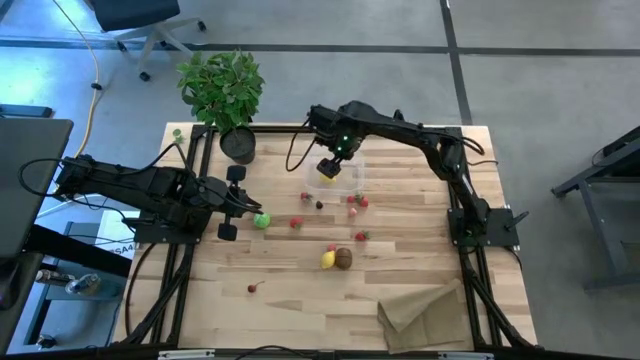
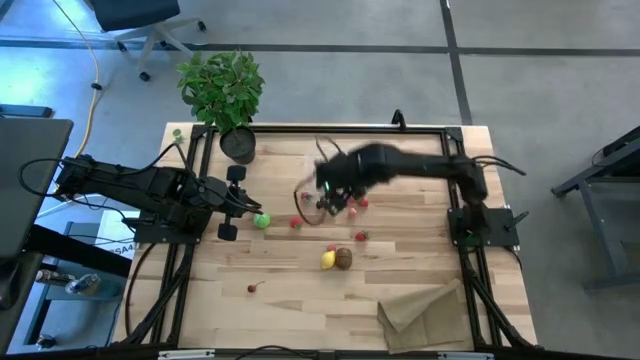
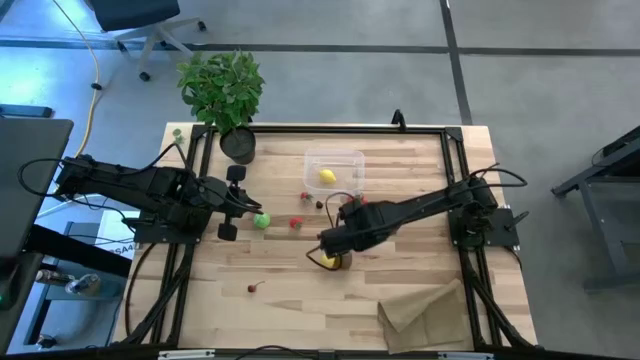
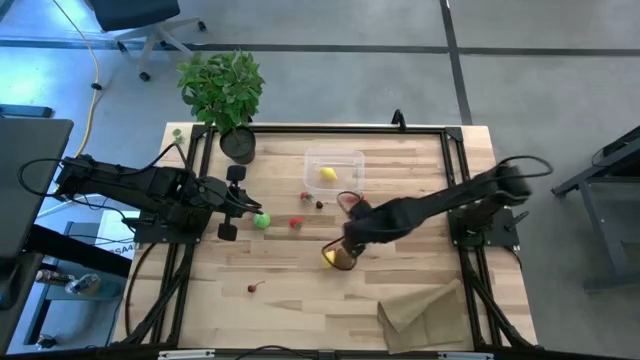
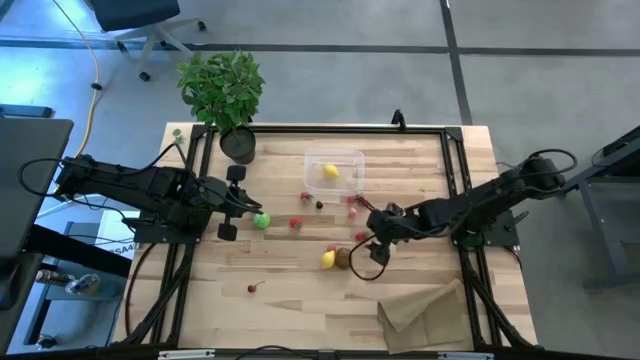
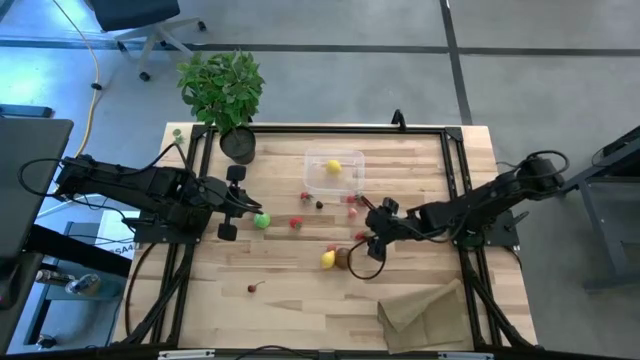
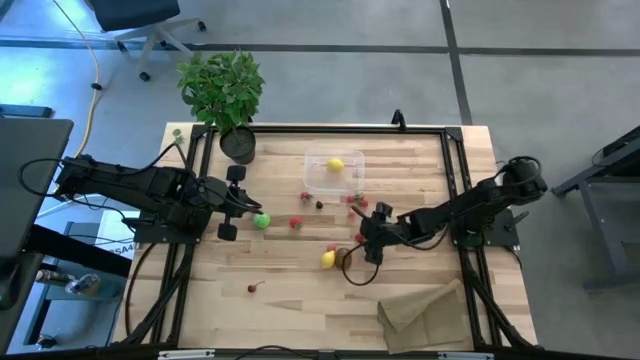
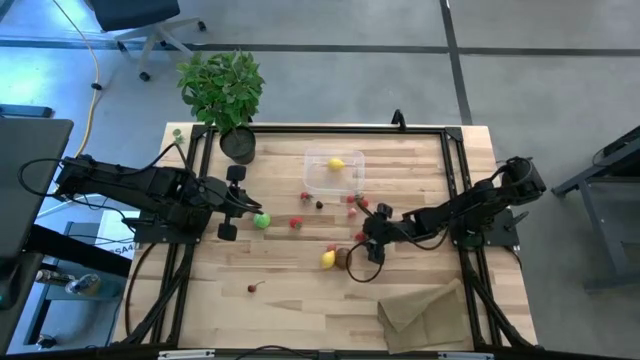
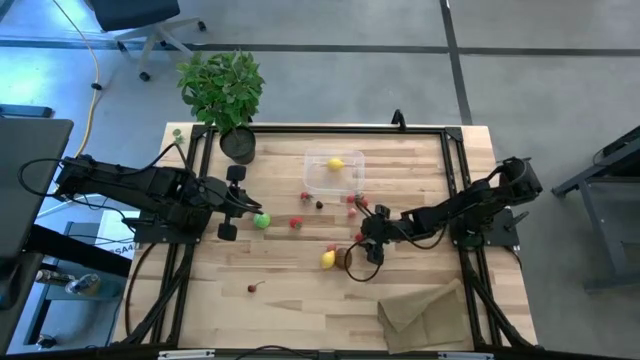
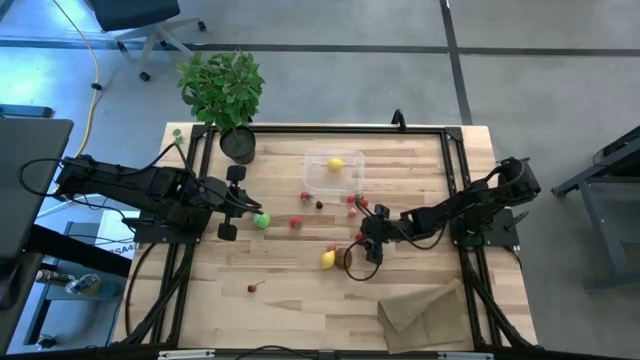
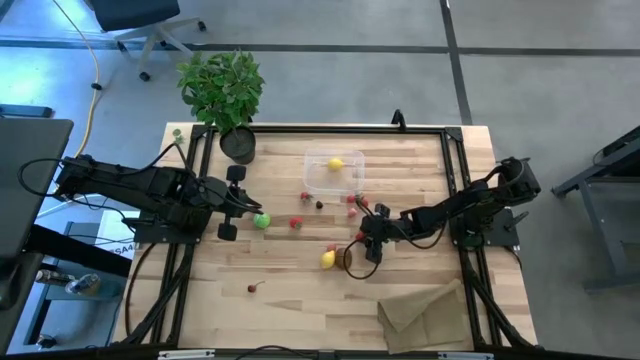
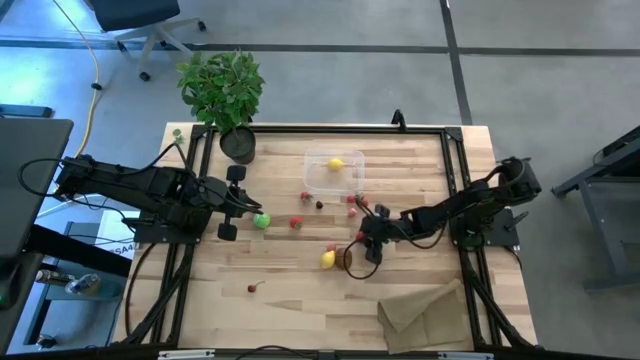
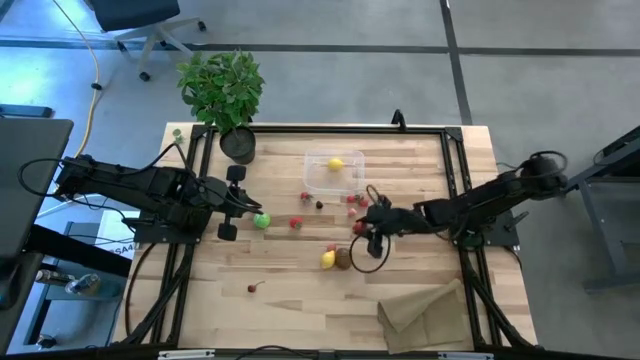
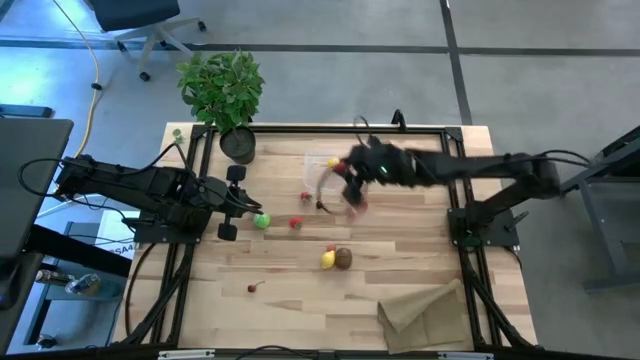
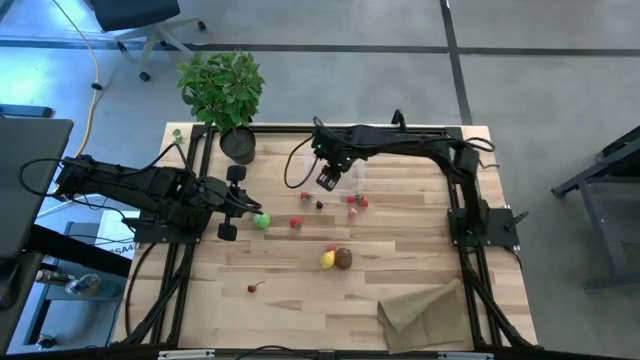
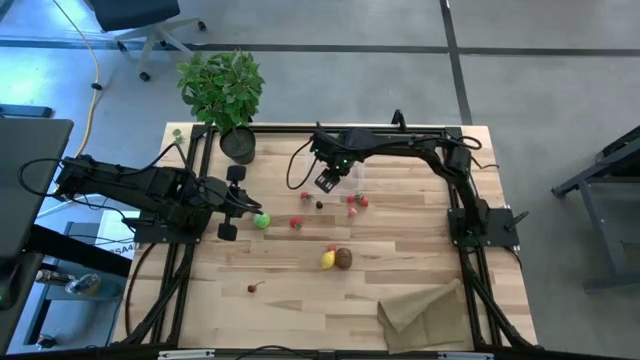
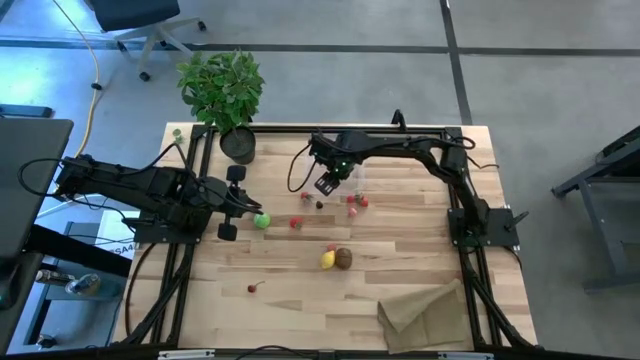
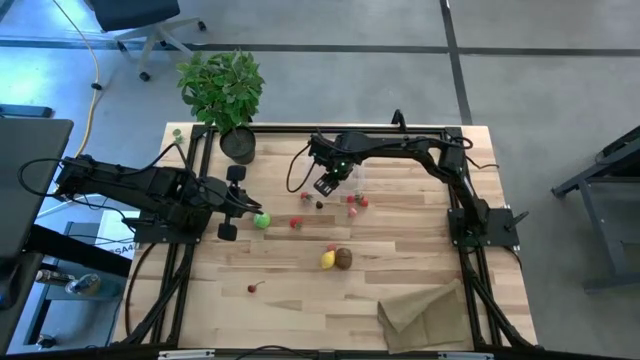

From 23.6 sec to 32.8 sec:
Task: Pick and placing Produce into tupperware
Put the bottom right strawberry into the transparent bin

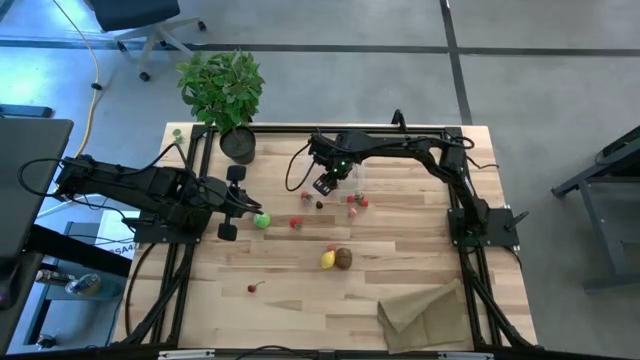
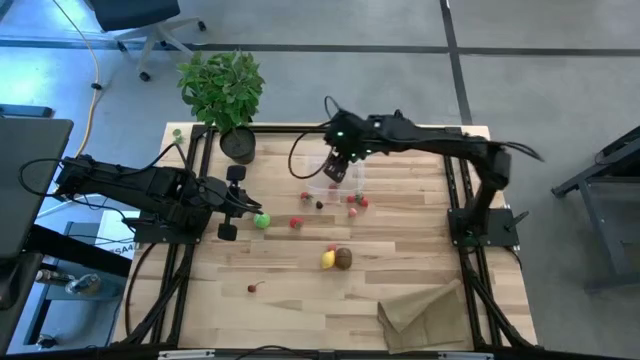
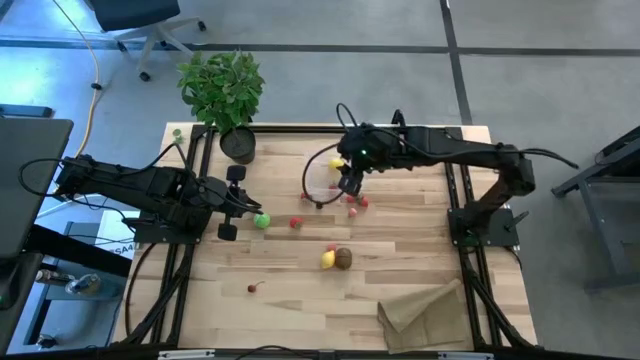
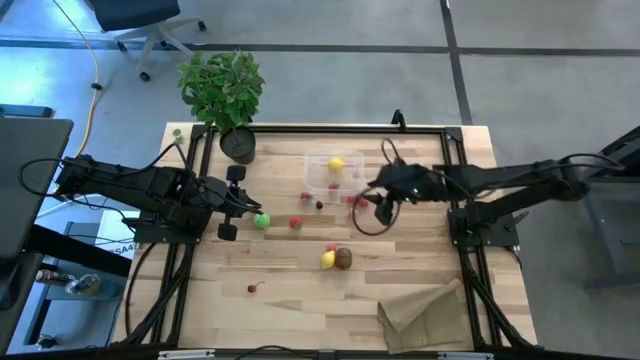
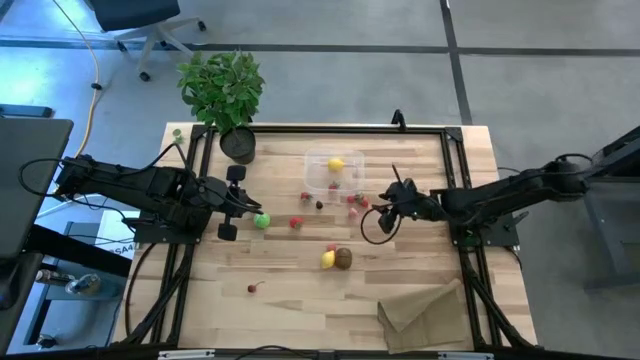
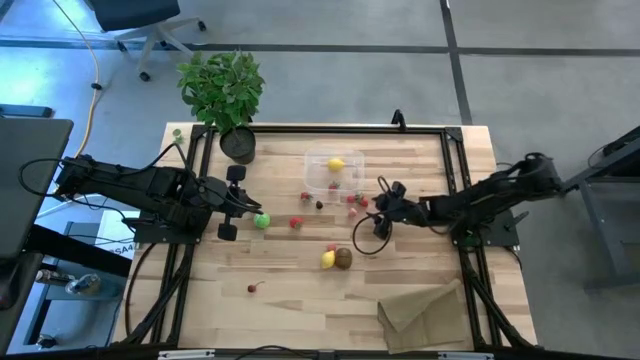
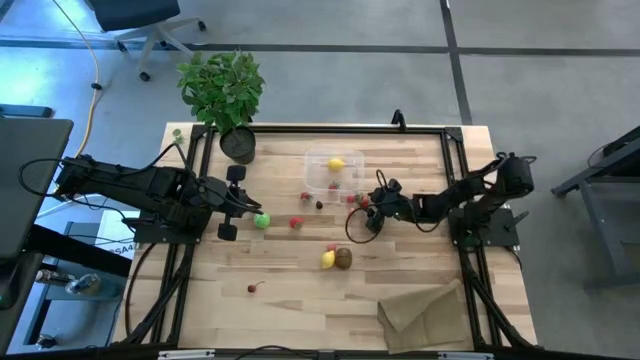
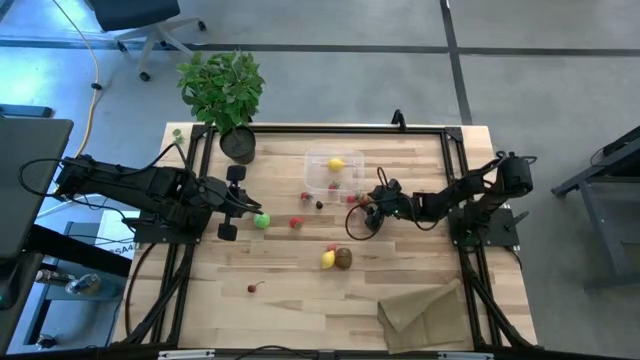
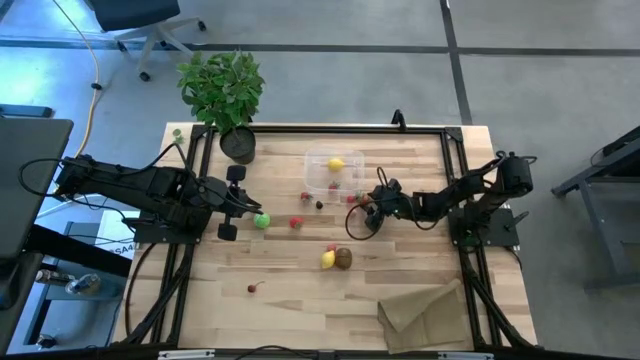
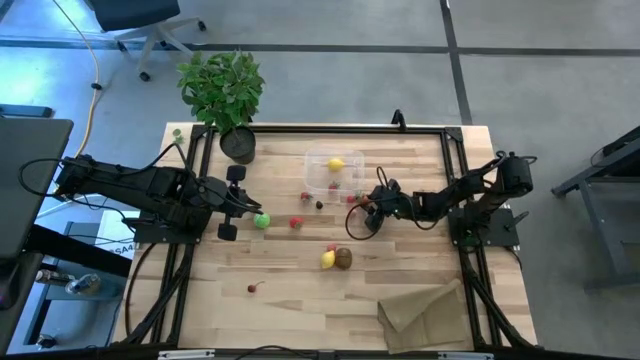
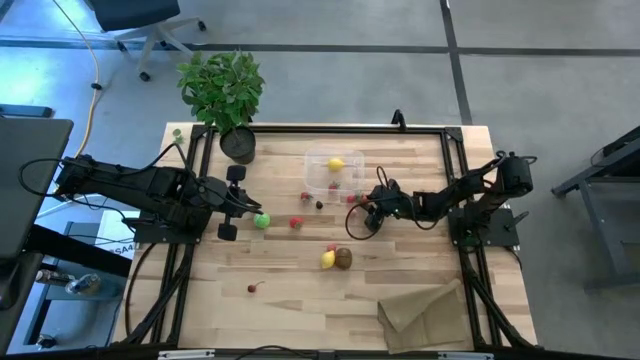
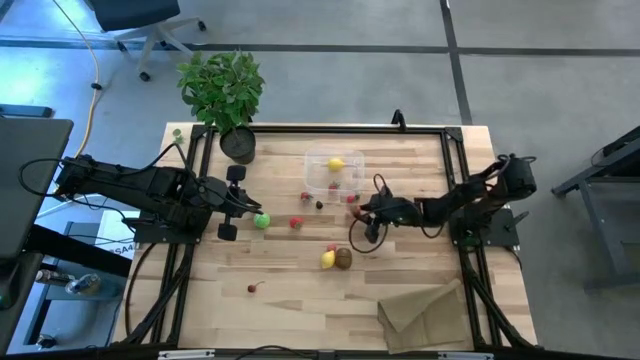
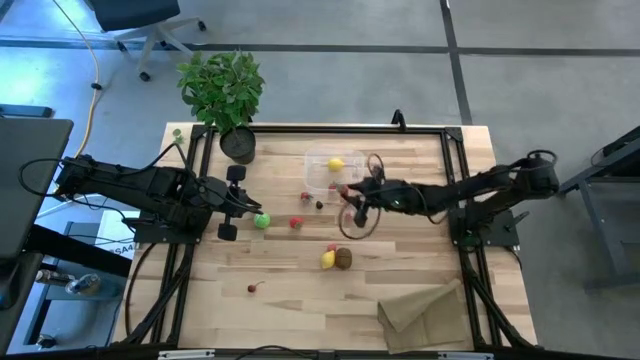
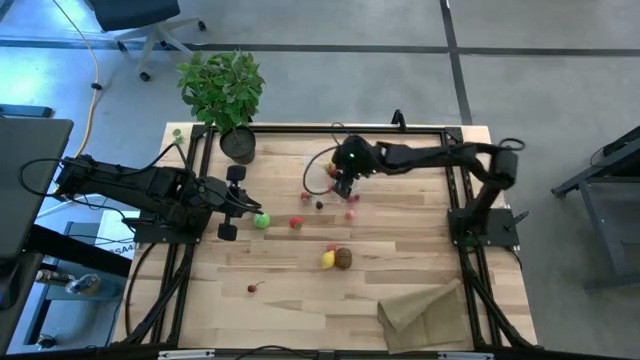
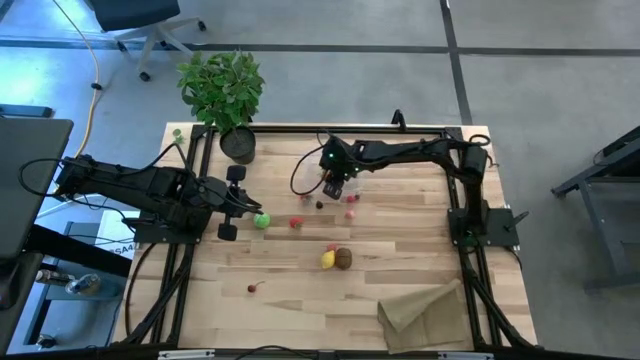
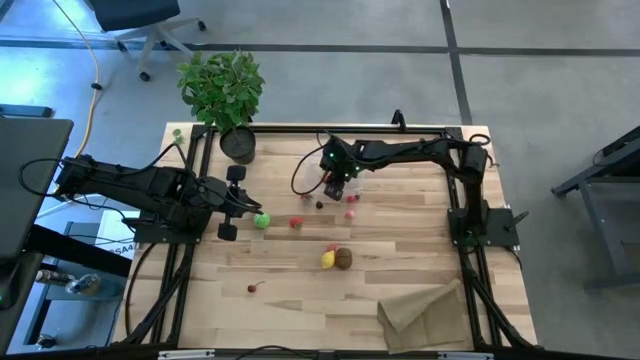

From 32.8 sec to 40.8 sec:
Put the right strawberry into the transparent bin

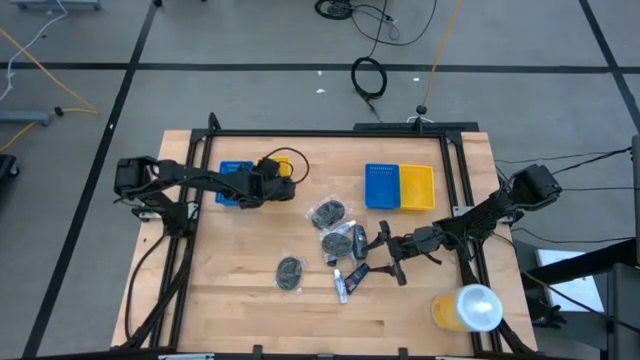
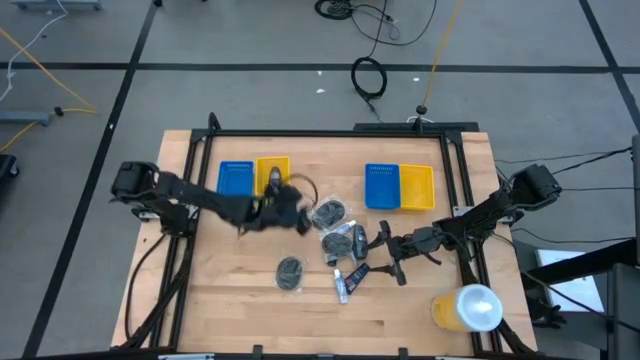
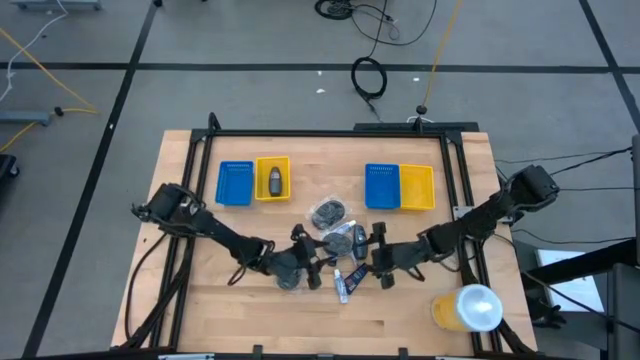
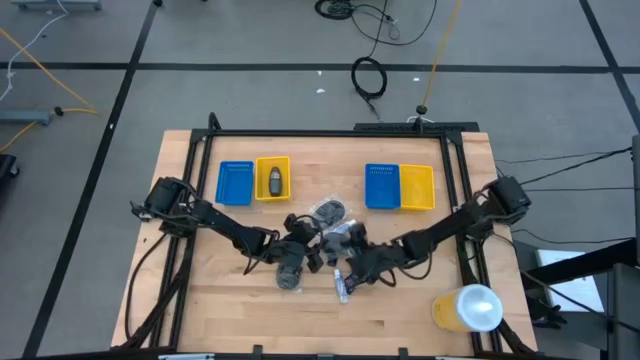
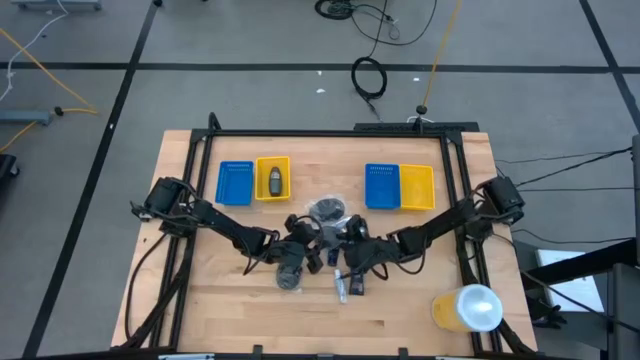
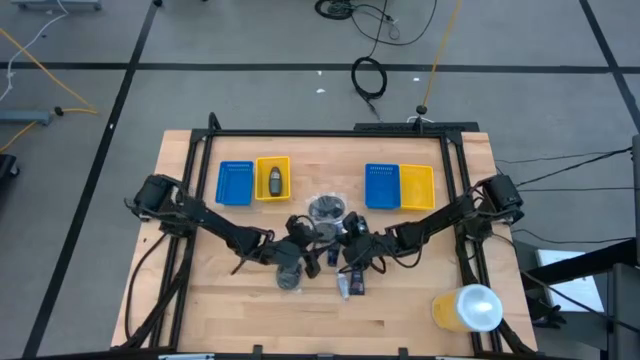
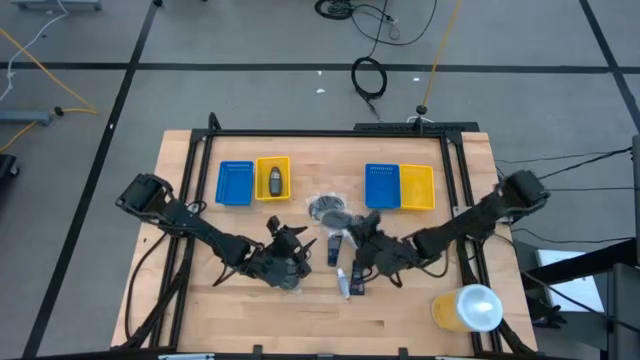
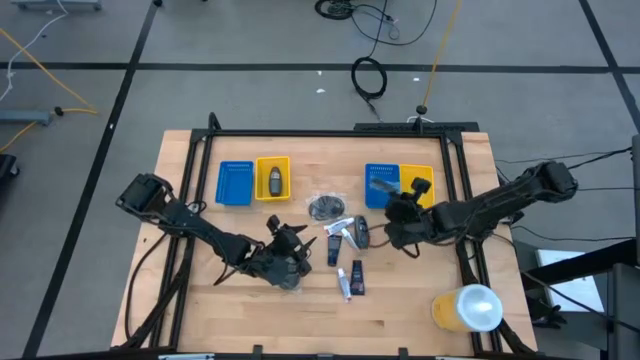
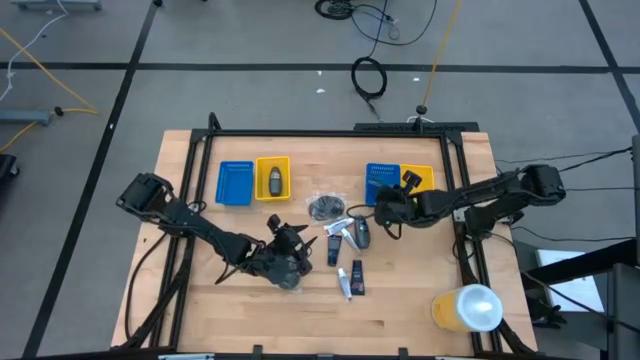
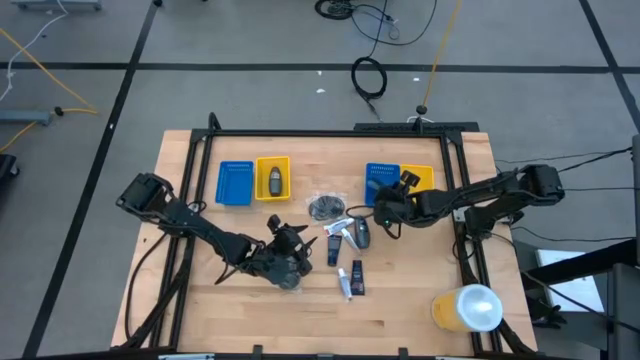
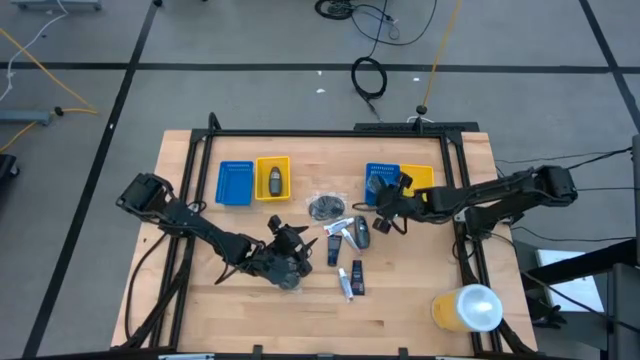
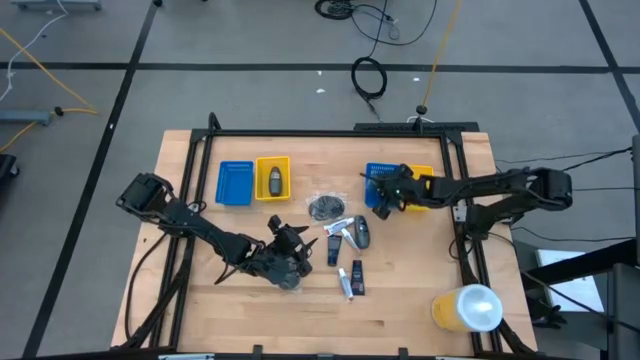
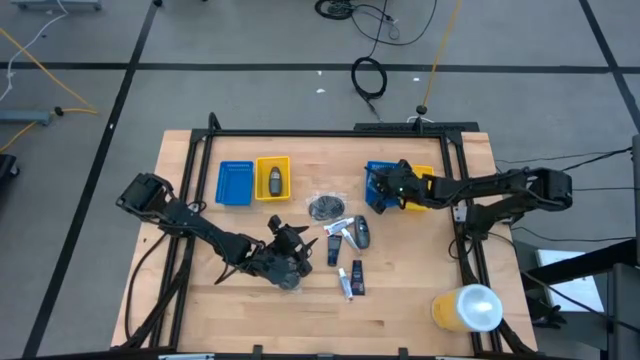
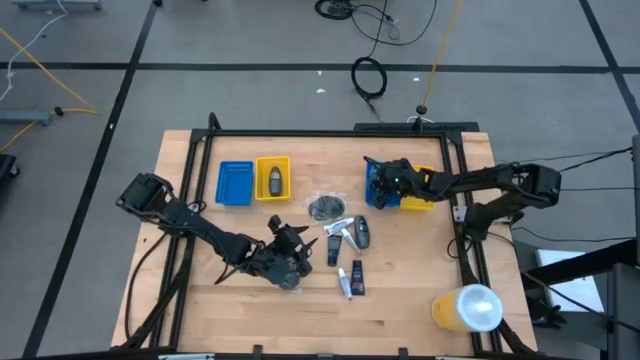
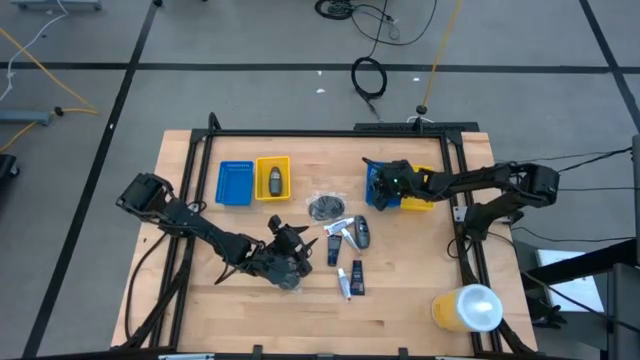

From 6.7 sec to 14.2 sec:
Task: Pick & Place Travel size toiletries
Put the black hairbrush into the right blue bin
